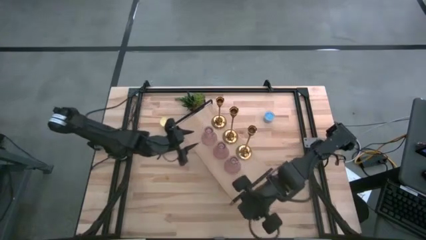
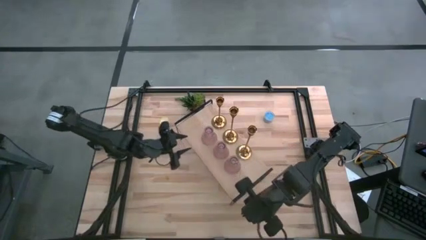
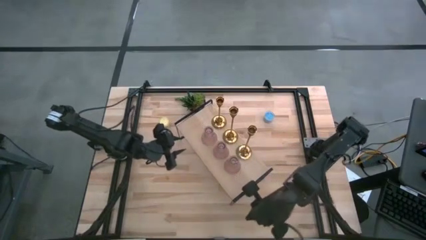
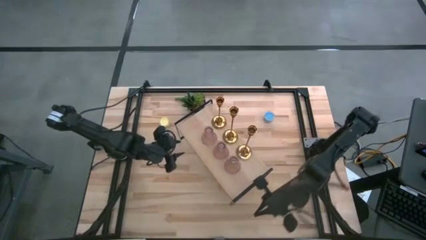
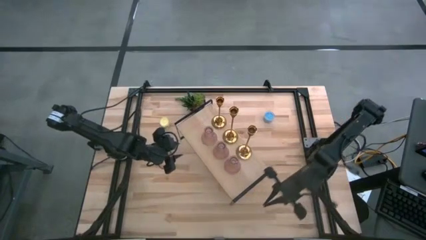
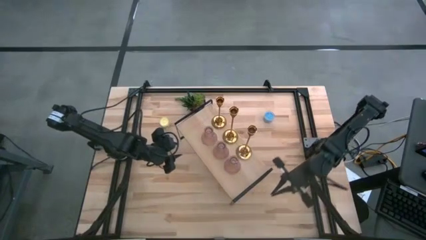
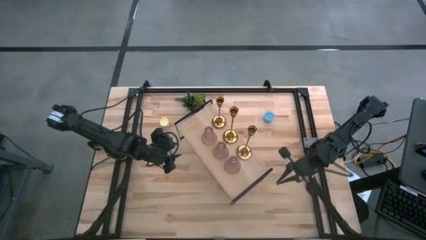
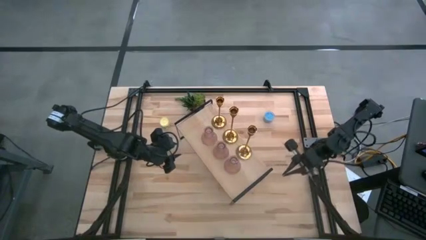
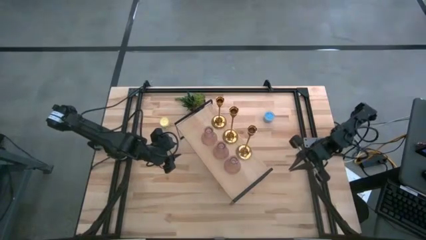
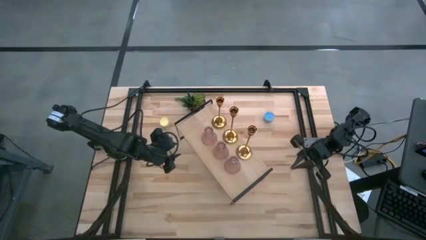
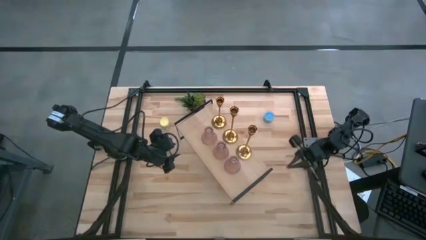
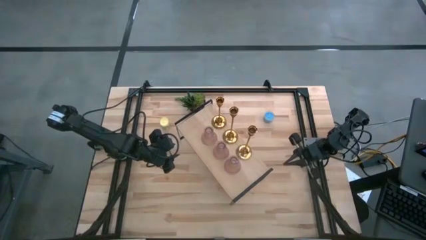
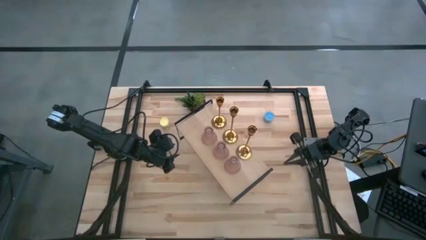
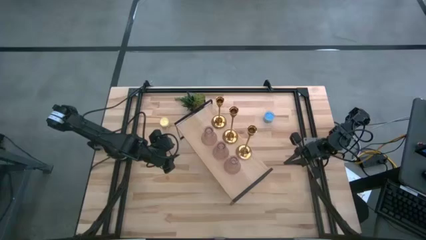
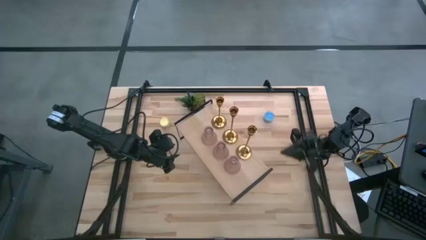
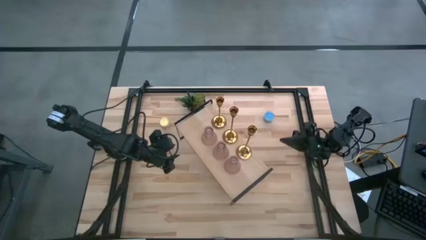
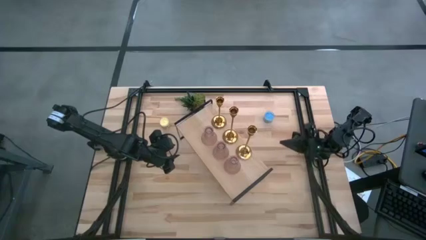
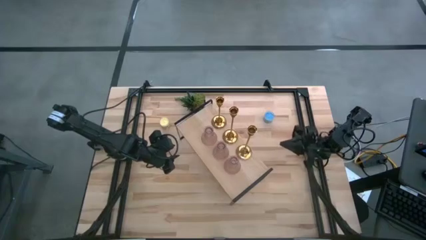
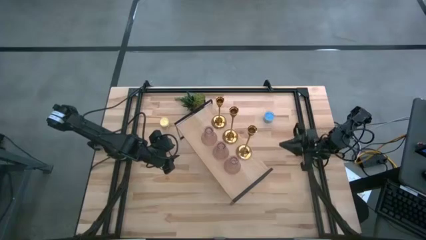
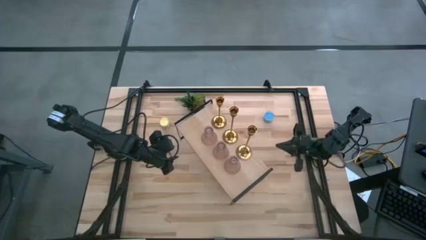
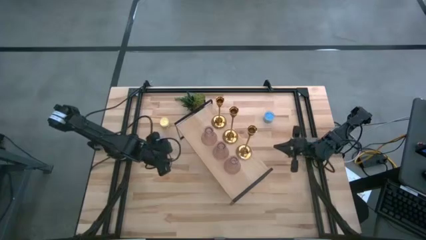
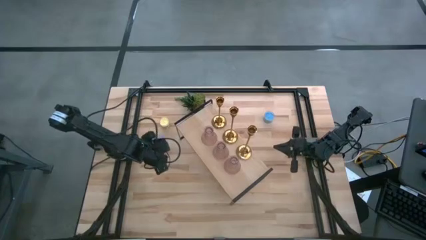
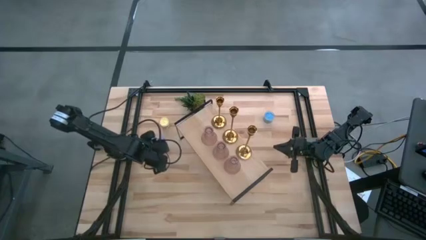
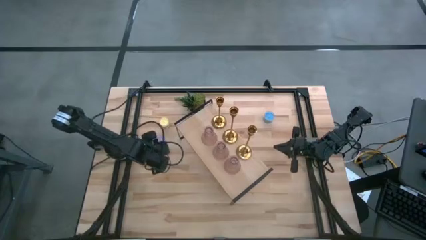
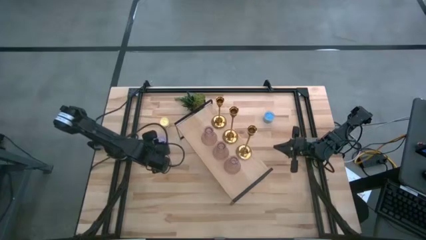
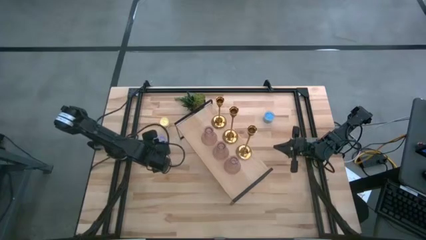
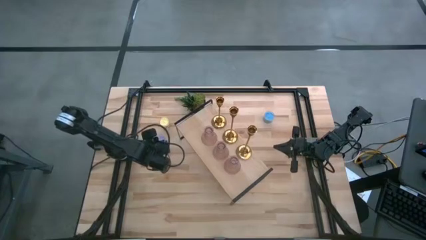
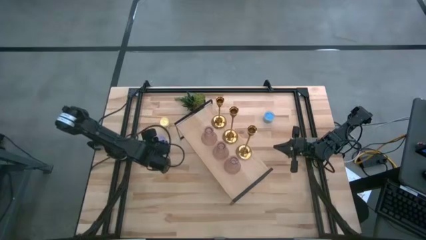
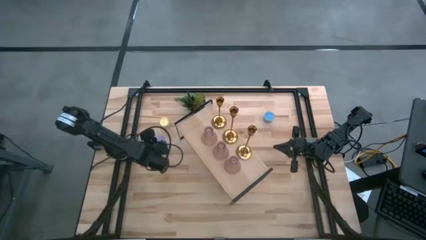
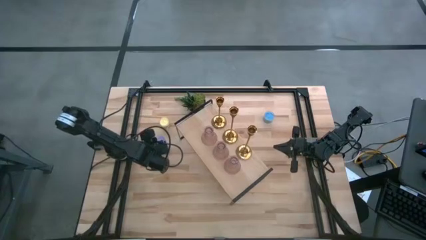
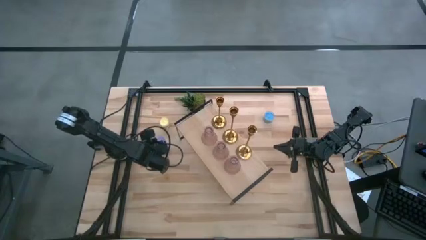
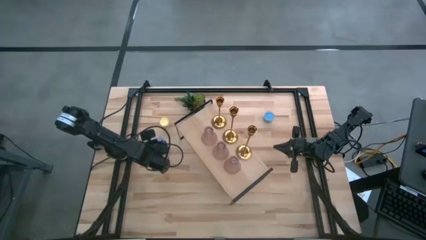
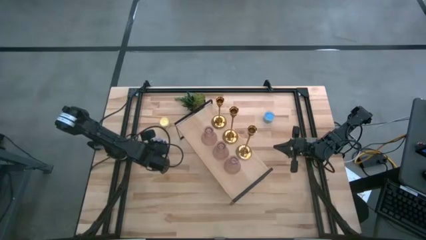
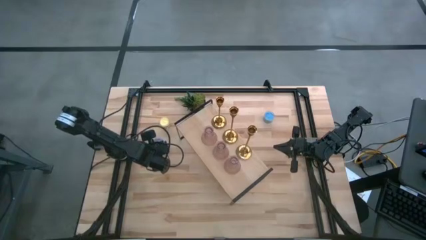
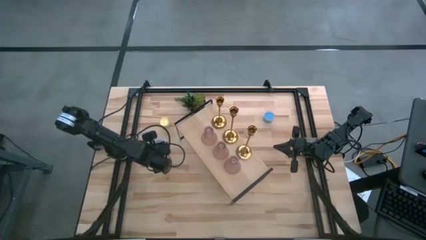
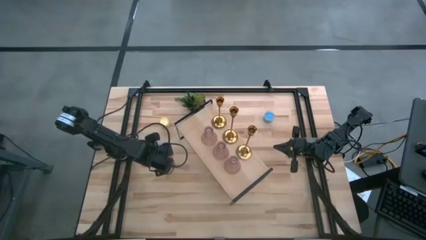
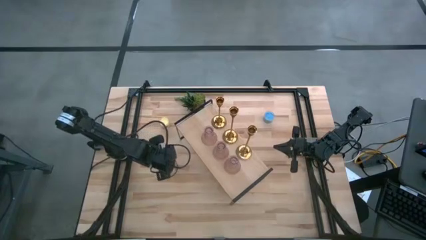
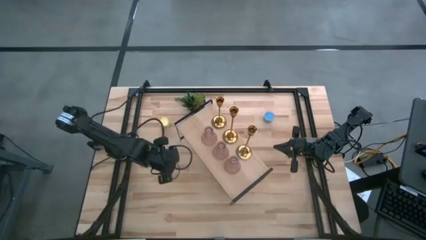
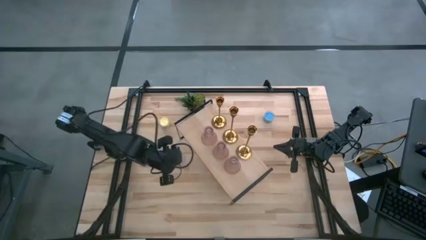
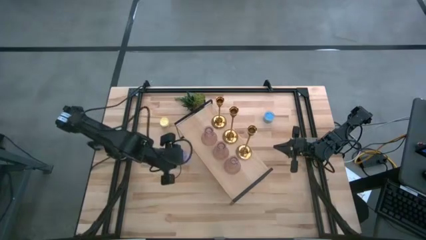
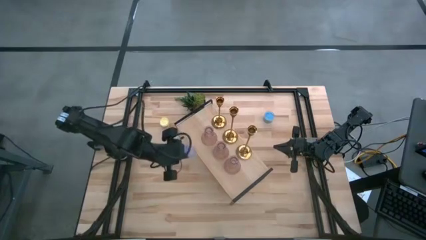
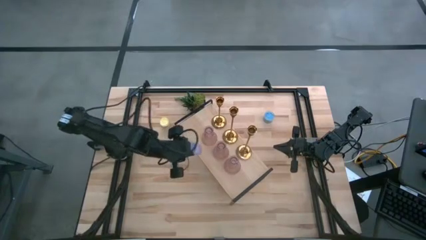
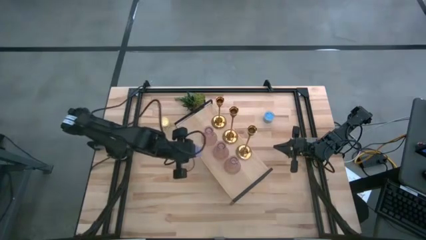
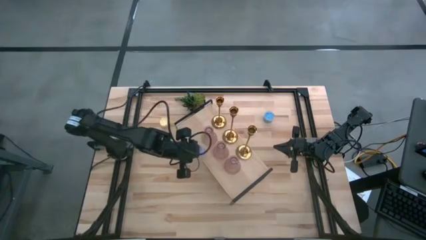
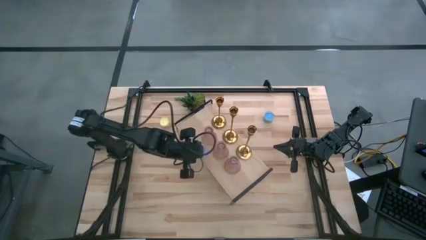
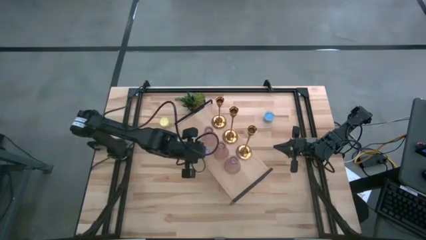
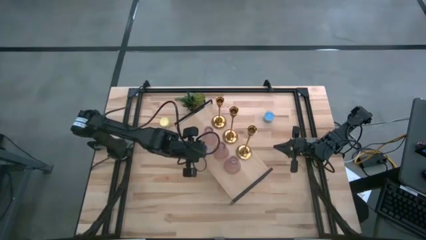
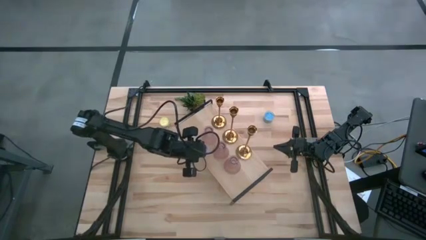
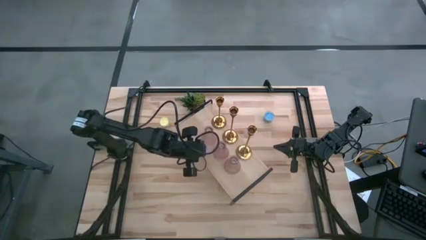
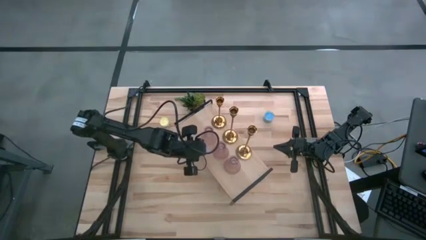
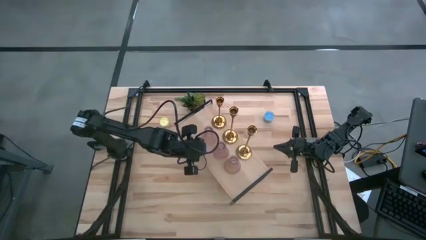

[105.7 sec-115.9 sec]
Task: Pick & Place candle stick holders
Put the purple scented candle on the shelf

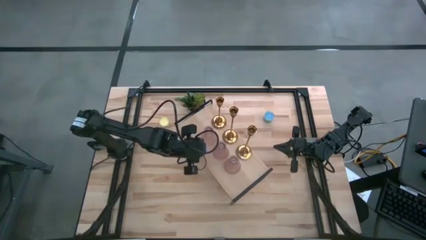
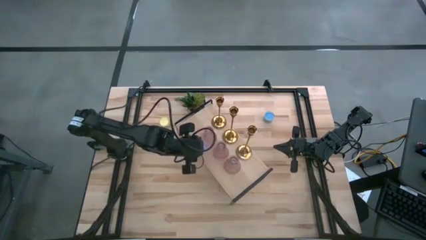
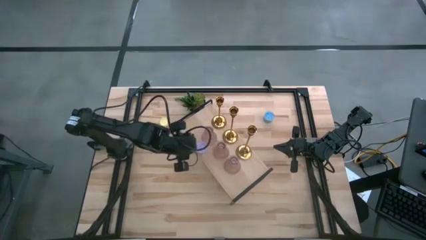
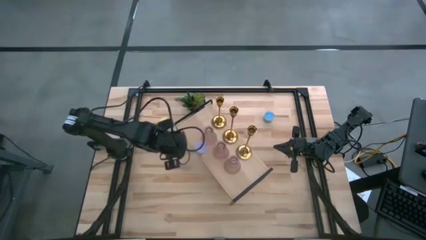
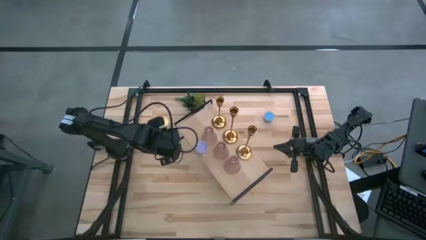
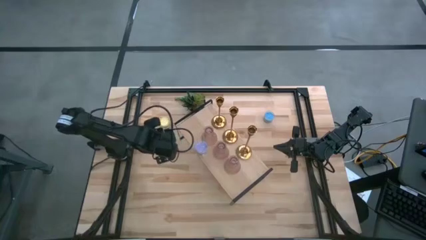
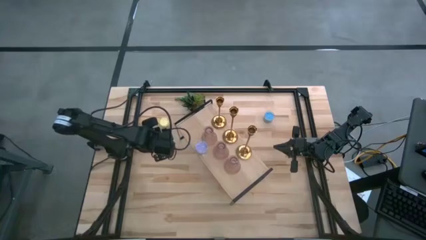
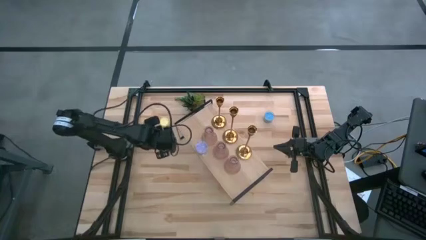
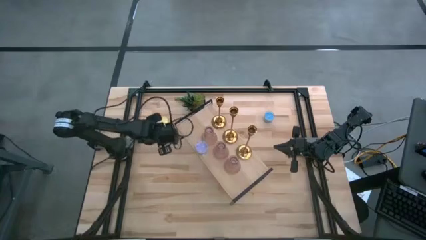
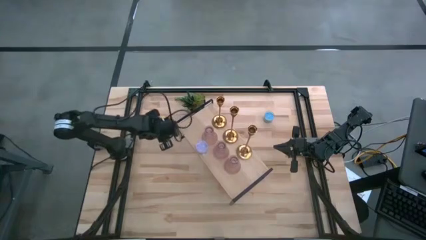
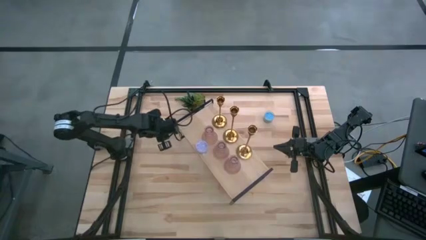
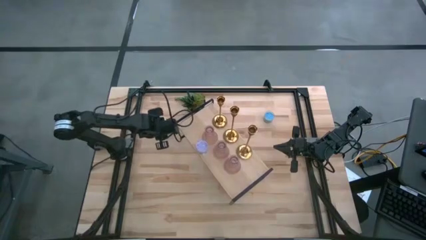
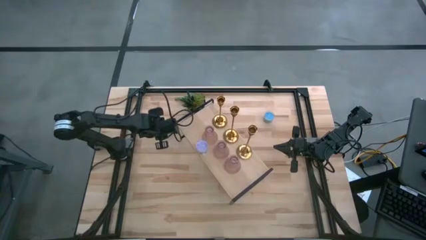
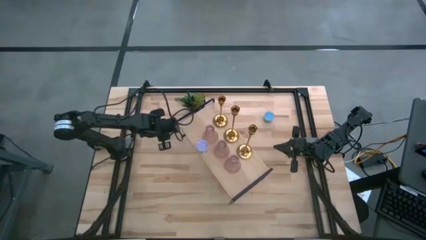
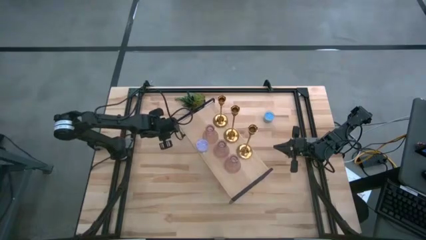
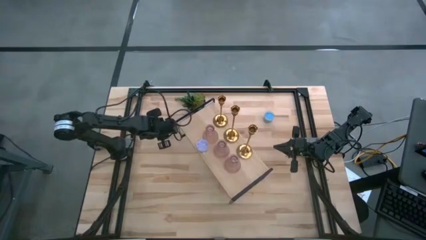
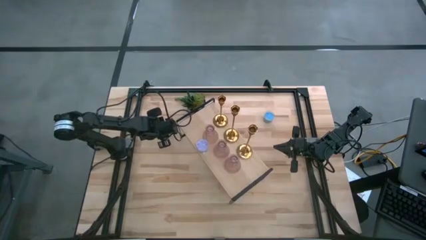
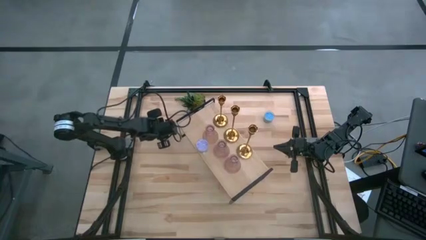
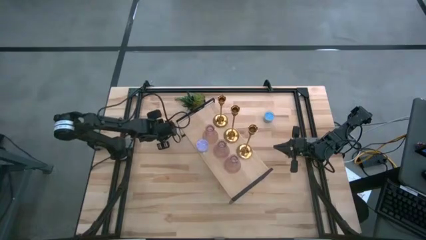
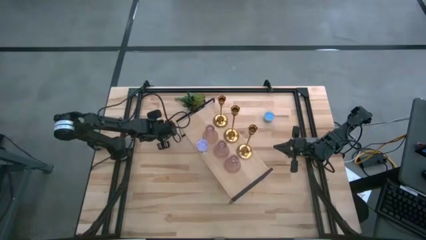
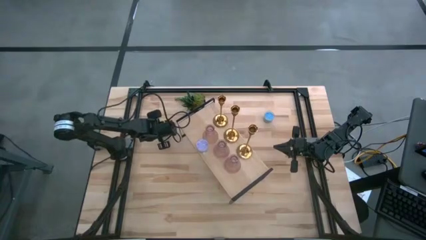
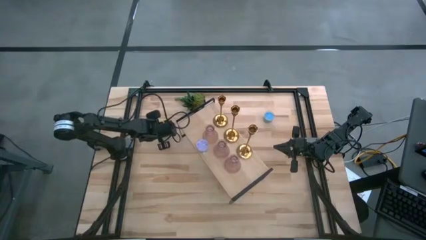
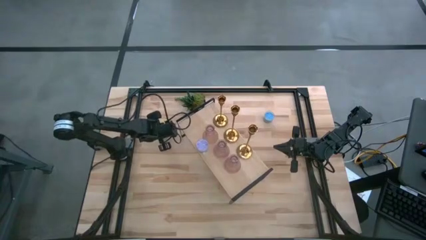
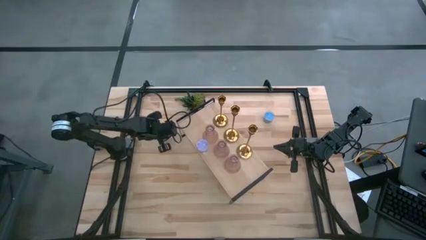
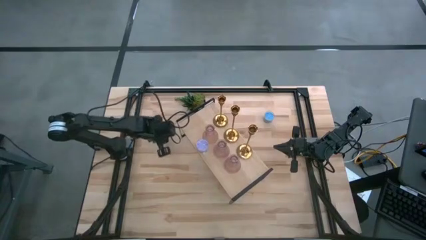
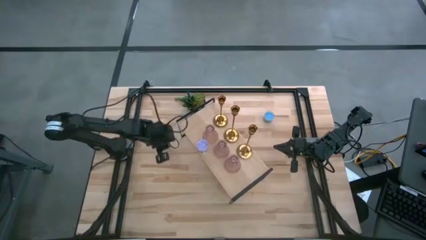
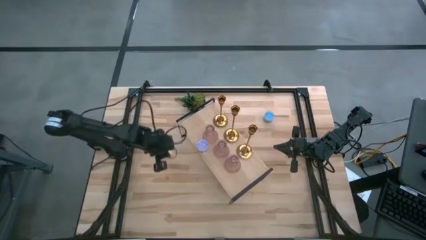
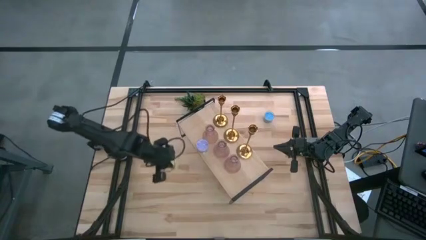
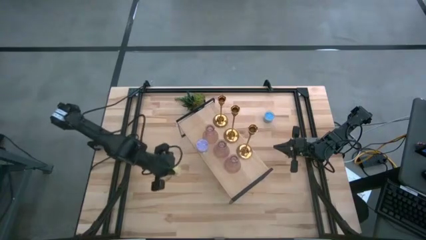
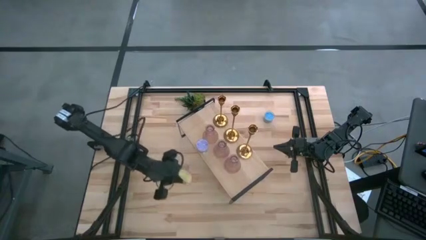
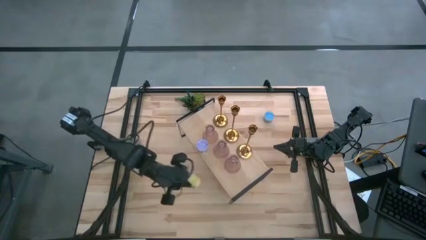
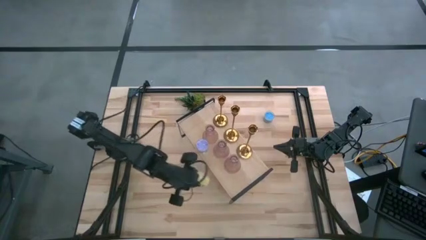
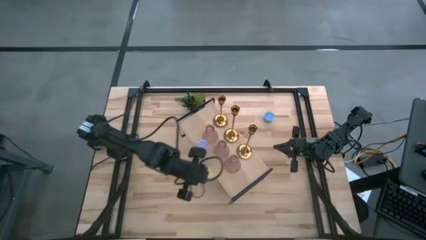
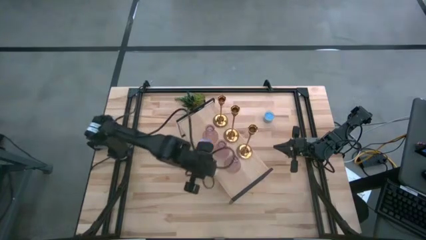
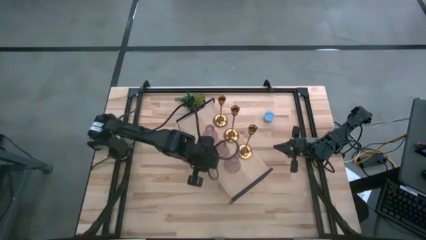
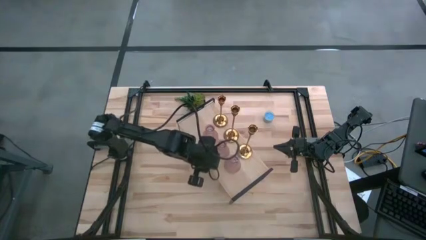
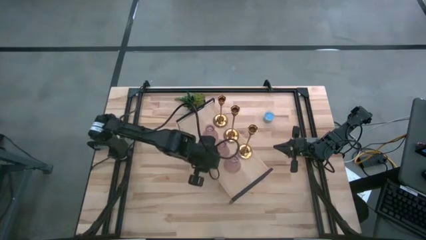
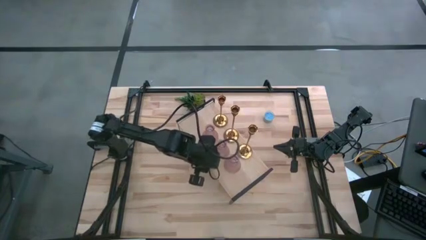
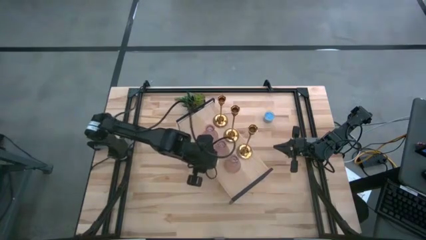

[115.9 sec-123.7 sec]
Put the yellow scented candle on the shelf aligned with the purple scented candle
